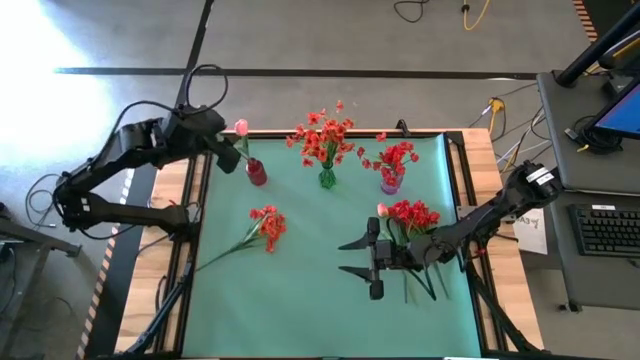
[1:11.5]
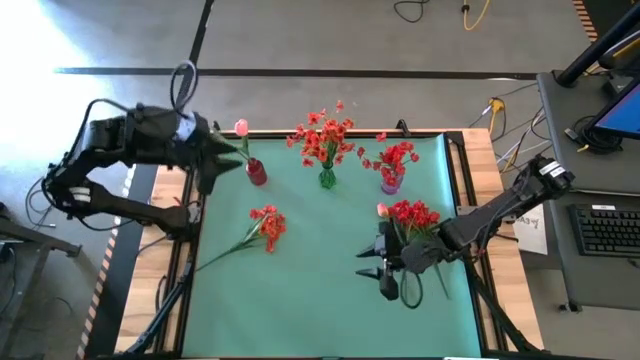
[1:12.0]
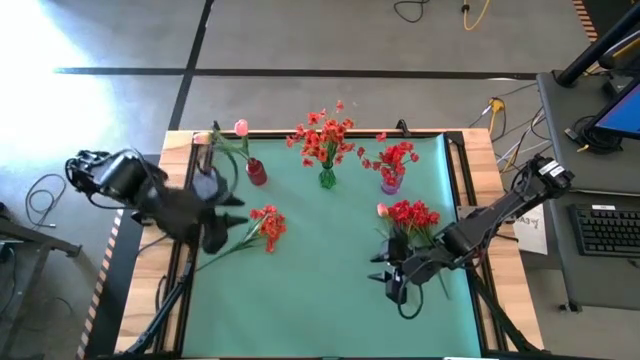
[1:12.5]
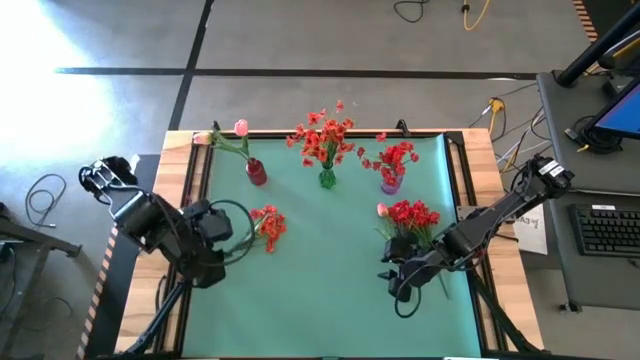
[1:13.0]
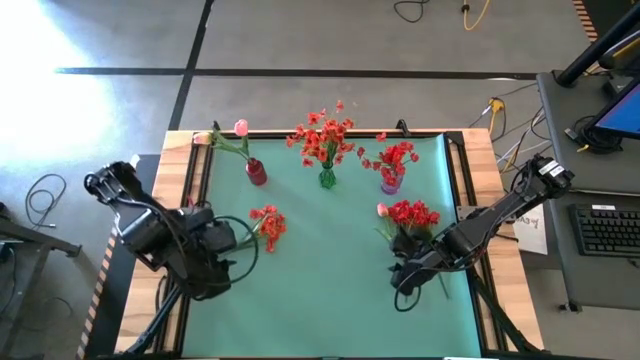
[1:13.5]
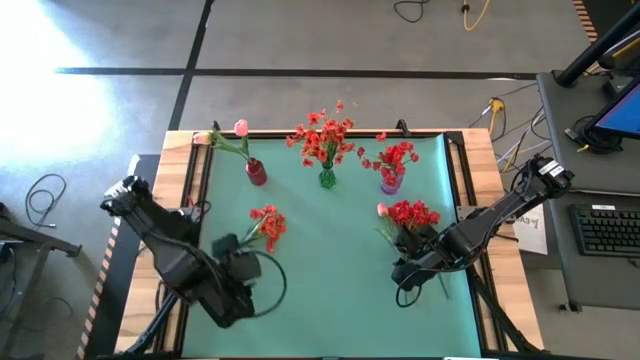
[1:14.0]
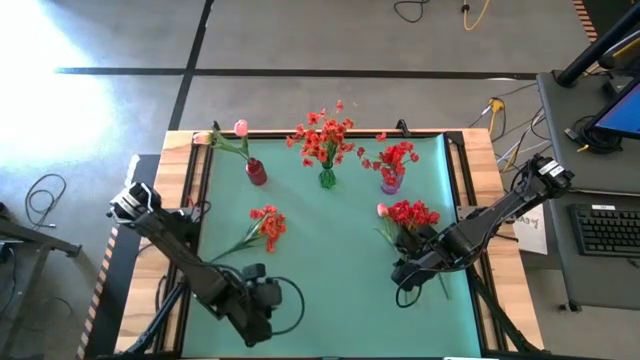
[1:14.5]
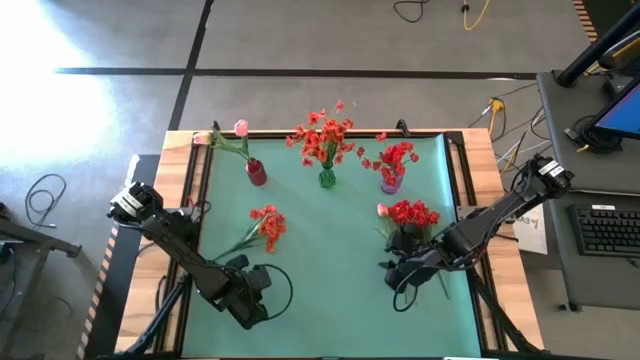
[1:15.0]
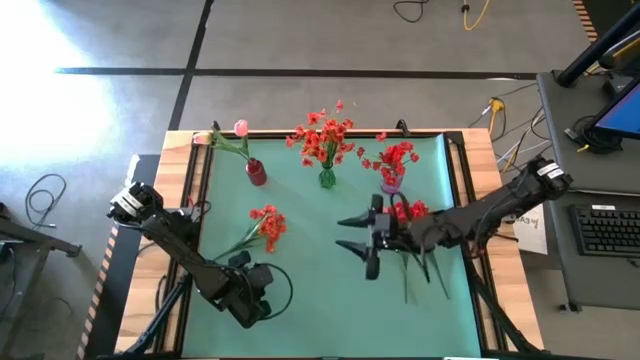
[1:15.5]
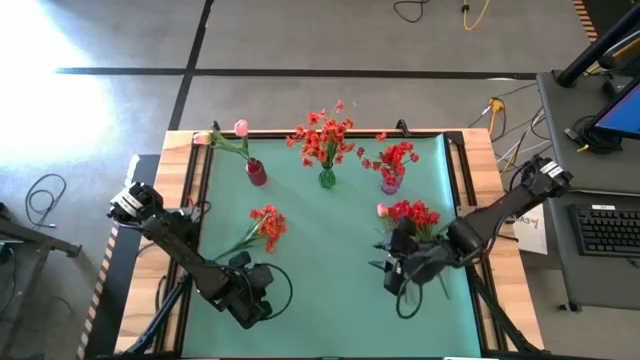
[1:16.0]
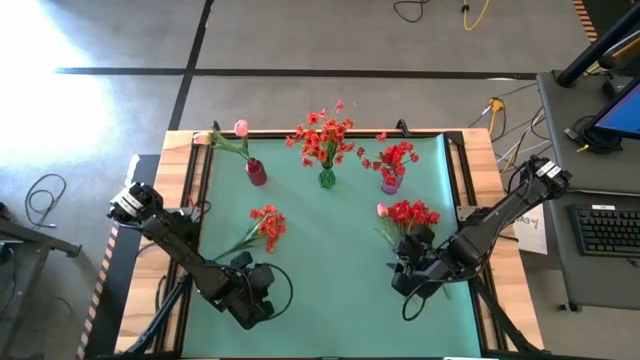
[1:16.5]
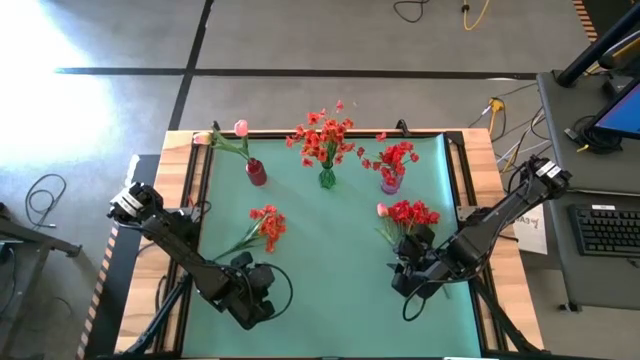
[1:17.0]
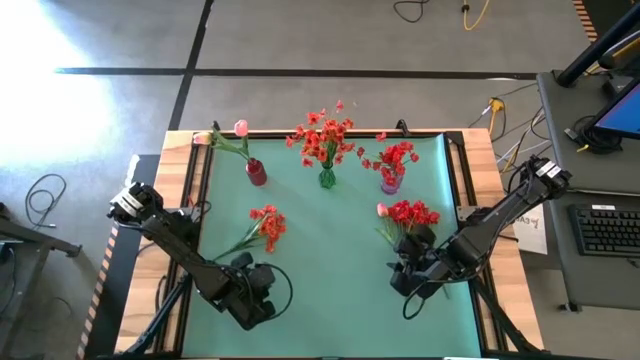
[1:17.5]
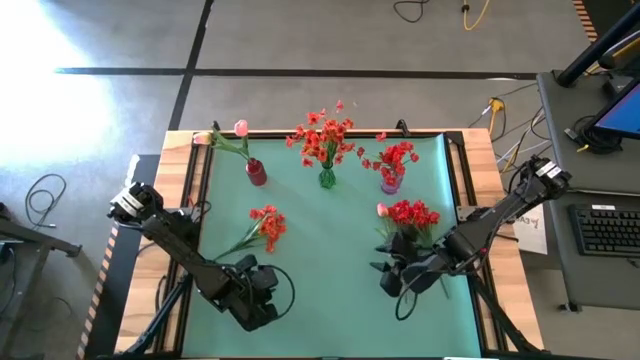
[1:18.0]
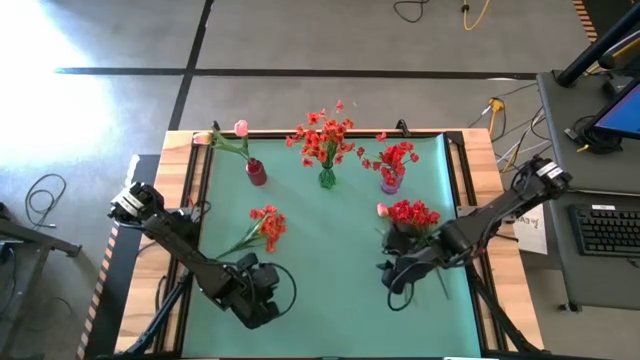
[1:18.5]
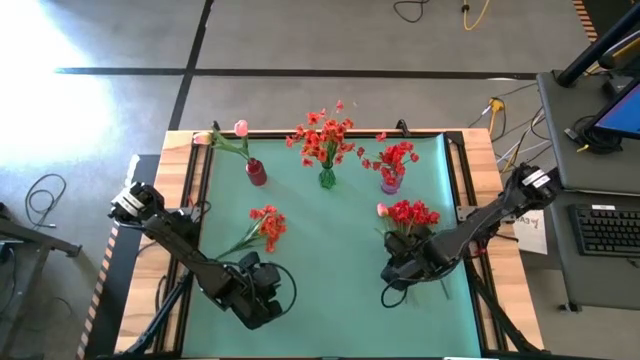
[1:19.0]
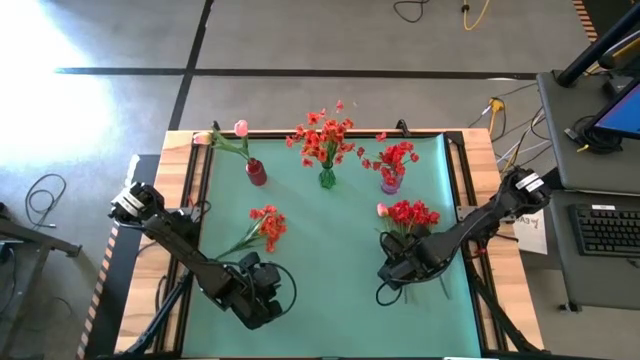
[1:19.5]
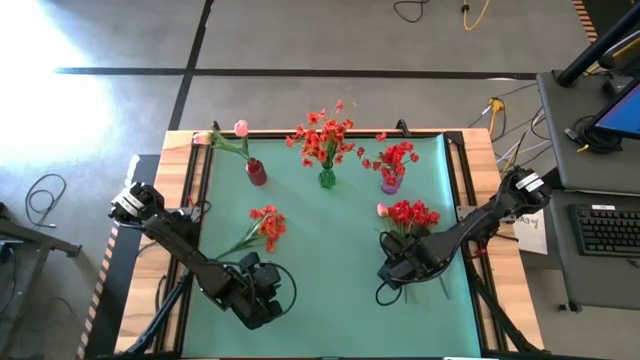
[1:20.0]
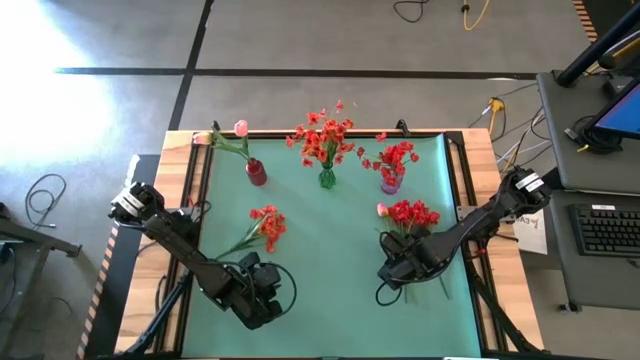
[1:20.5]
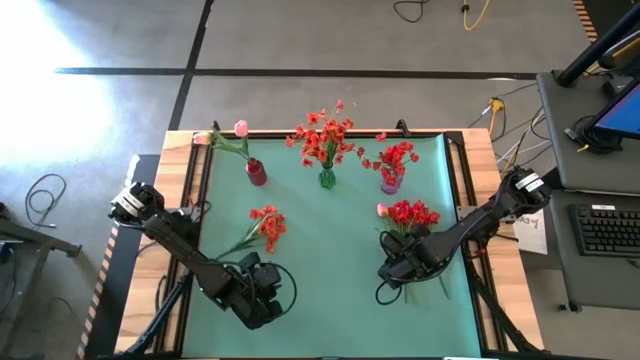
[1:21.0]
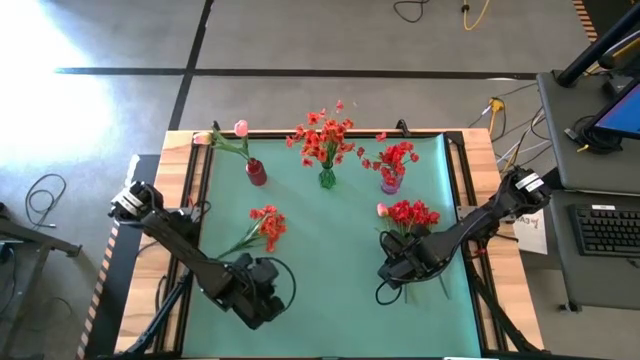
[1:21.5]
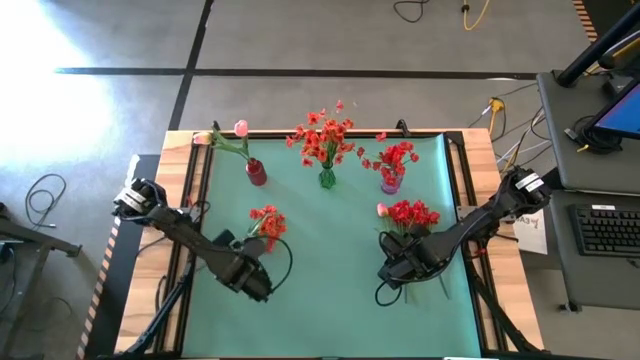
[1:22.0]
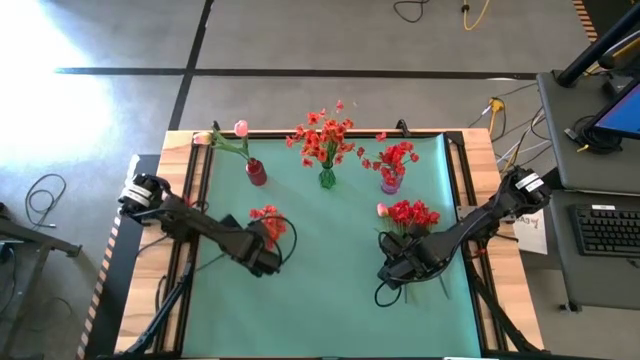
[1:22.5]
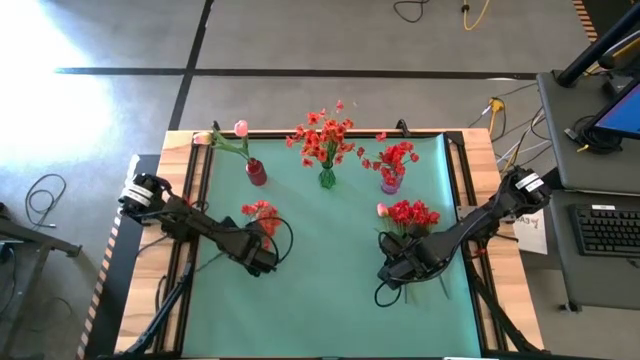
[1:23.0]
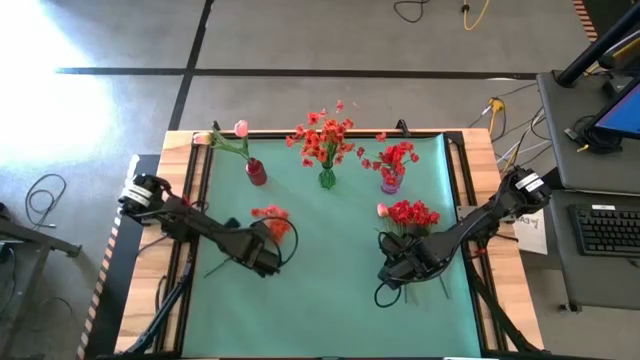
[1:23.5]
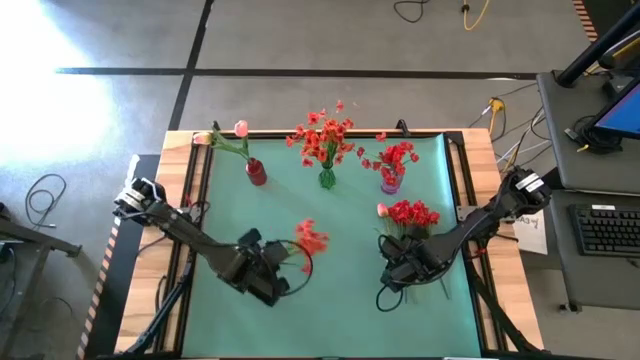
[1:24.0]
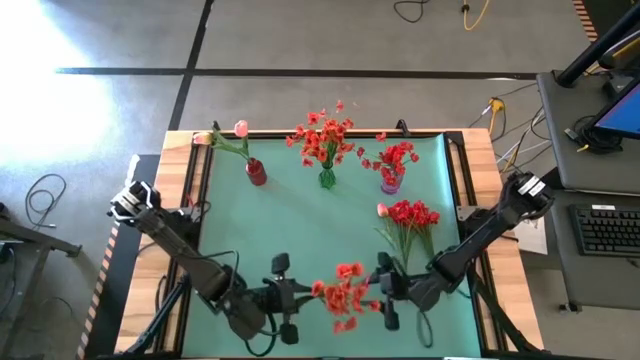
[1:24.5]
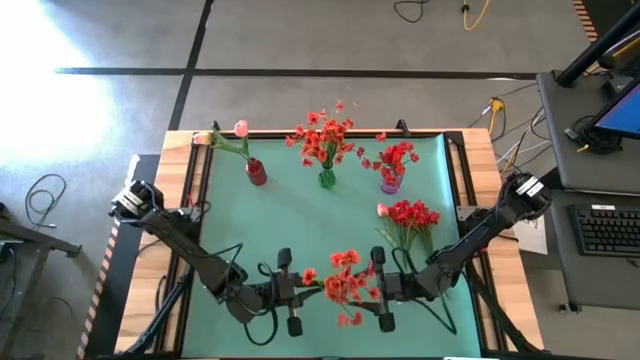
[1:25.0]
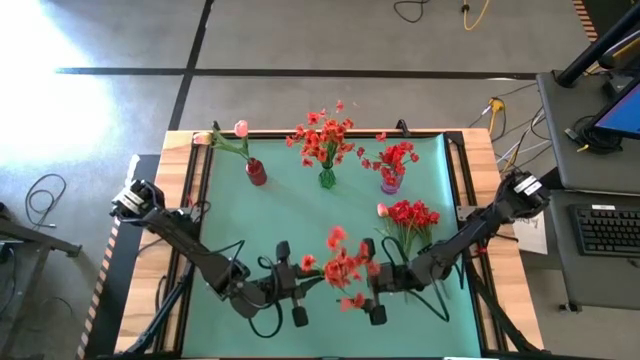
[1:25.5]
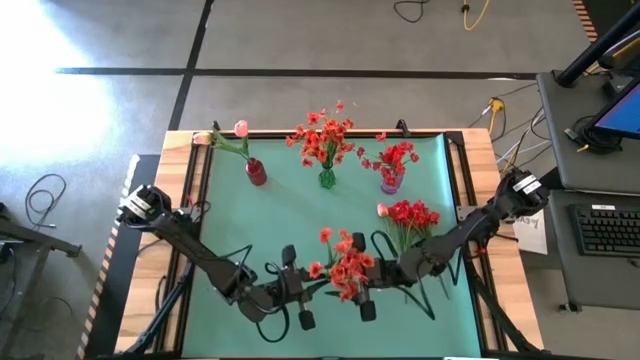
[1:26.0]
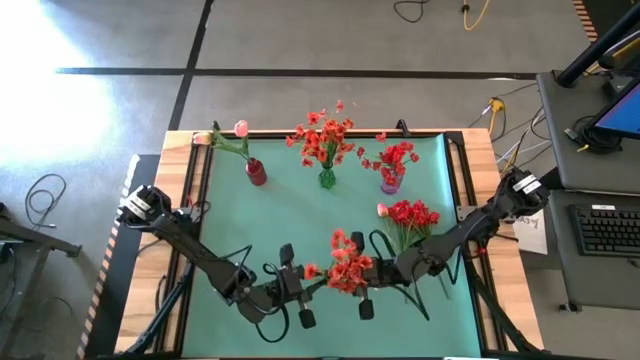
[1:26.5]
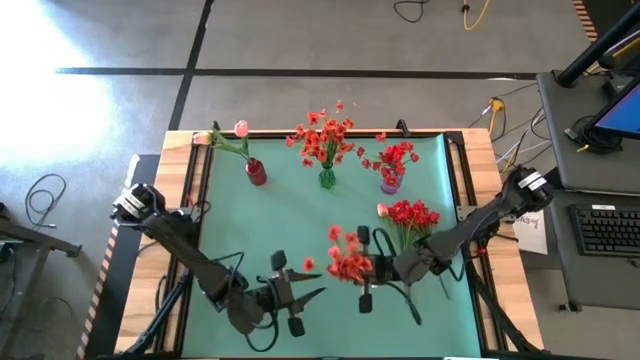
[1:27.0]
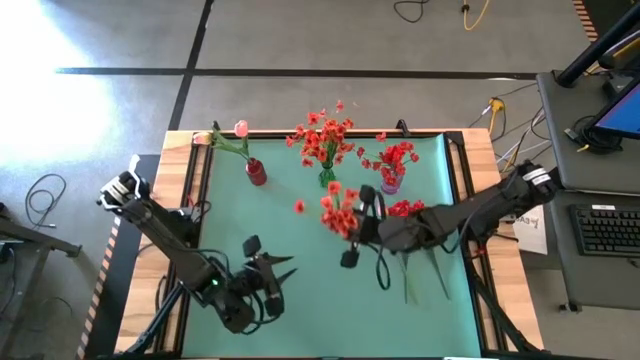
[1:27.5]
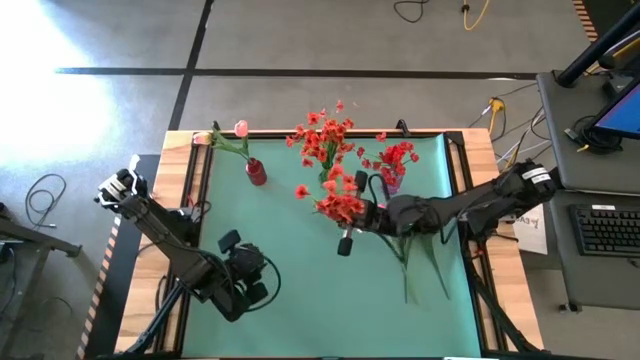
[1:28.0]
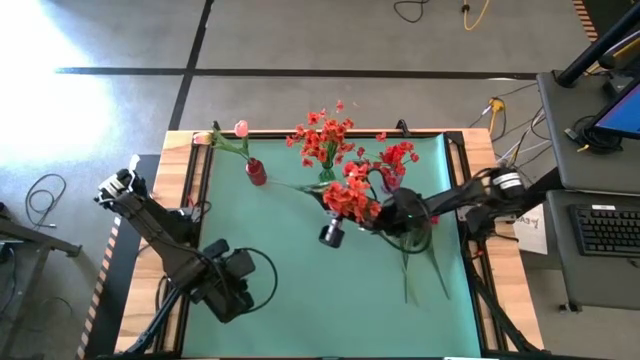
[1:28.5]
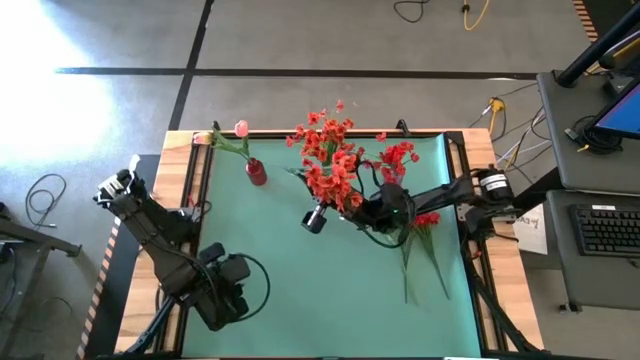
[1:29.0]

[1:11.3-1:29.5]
Task: Sort flowers into vase by color
Put the orange flower in the green flower vase

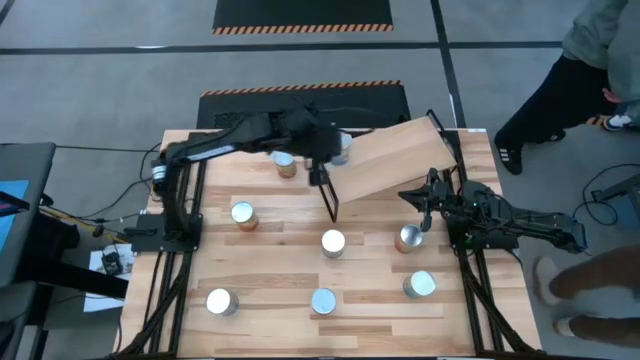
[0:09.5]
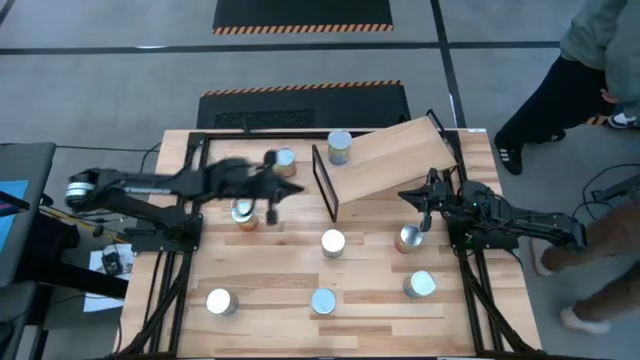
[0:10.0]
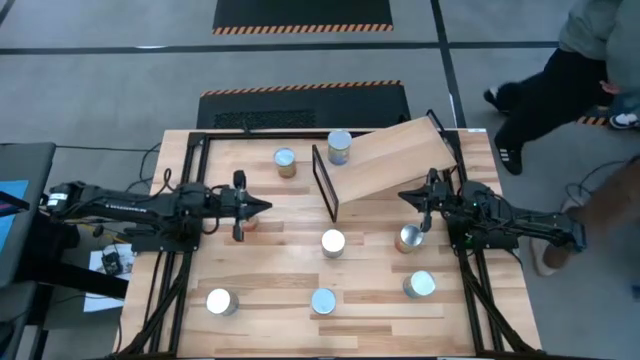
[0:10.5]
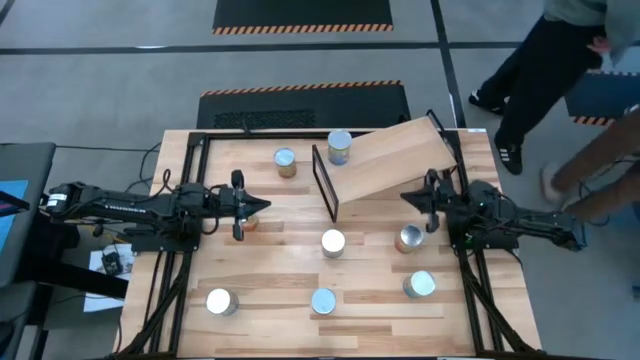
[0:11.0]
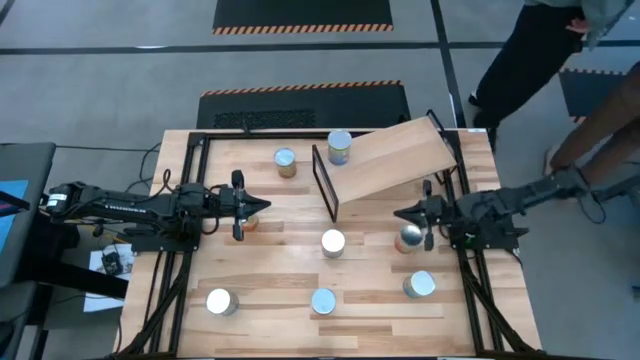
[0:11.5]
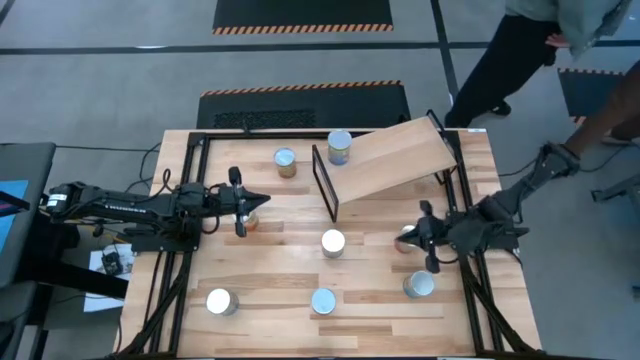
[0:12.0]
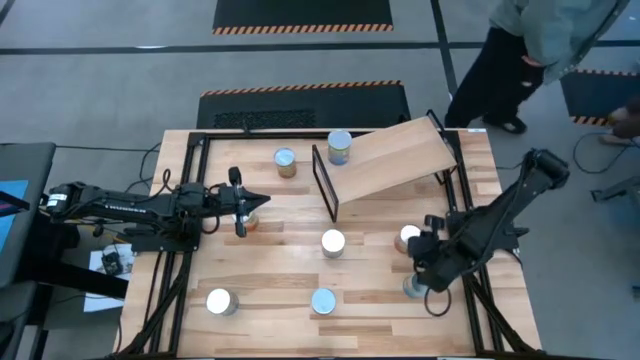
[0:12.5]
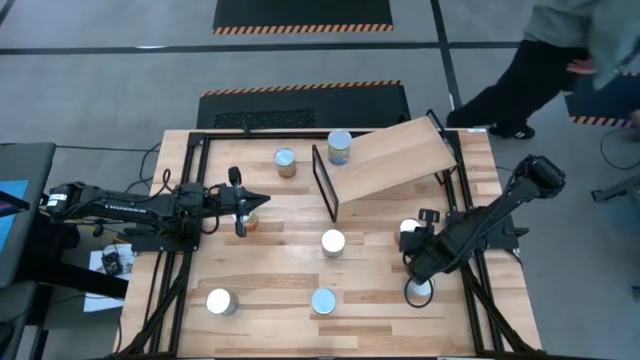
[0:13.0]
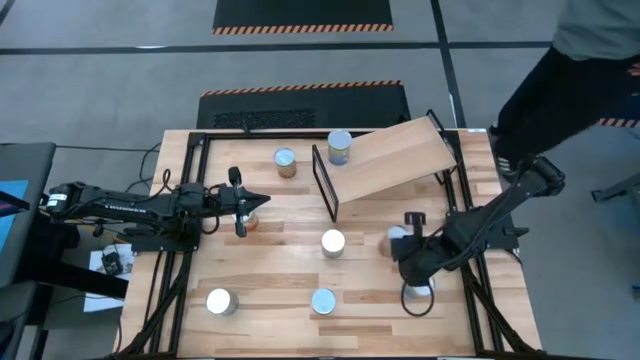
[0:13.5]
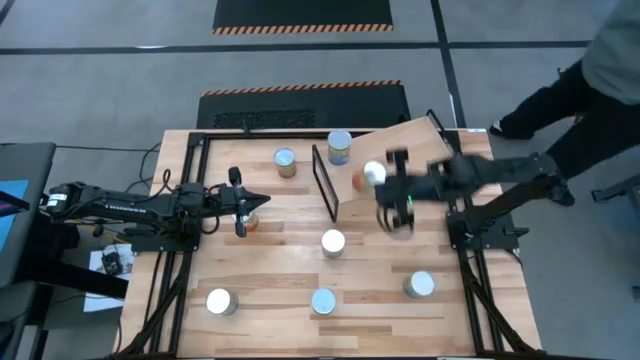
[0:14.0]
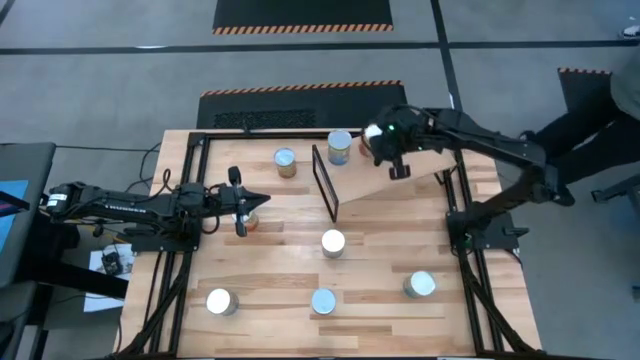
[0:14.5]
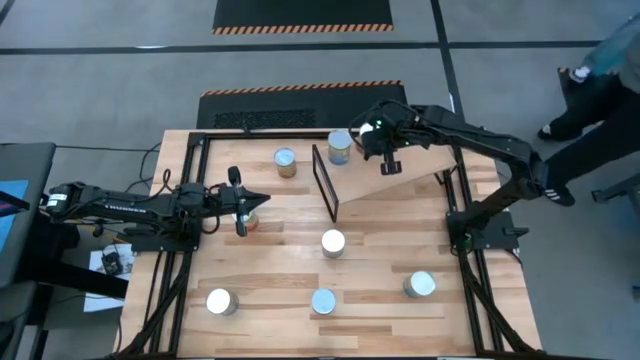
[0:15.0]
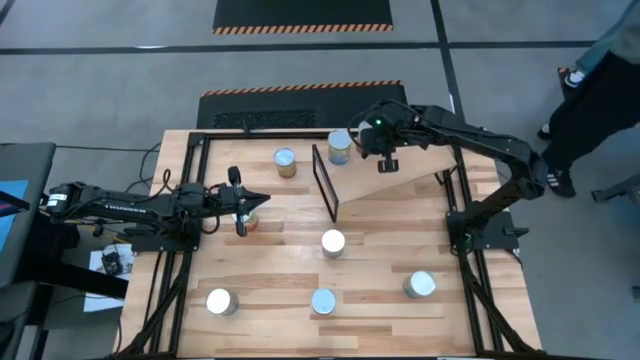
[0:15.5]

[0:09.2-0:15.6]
Task: Pick and place cans onto a shelf
Put the right canned green beans on the shelf
